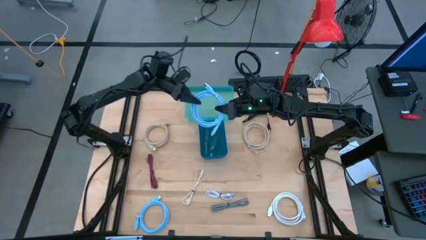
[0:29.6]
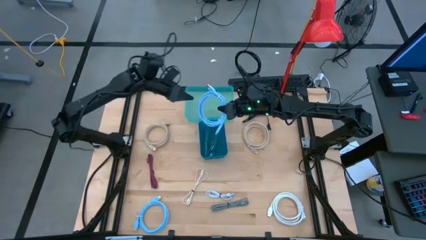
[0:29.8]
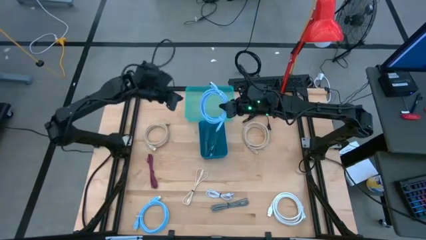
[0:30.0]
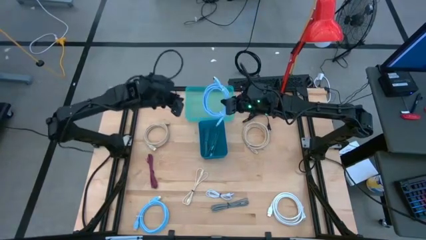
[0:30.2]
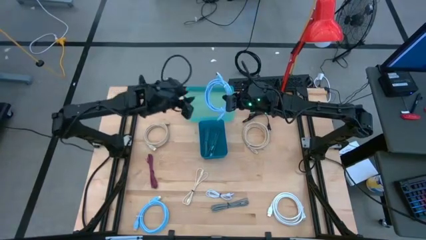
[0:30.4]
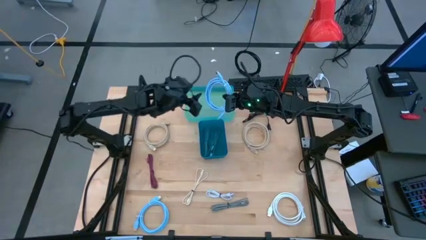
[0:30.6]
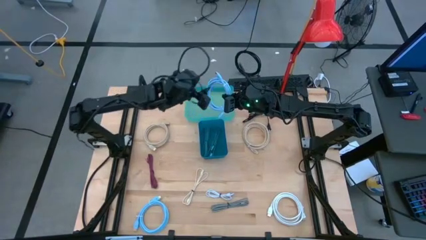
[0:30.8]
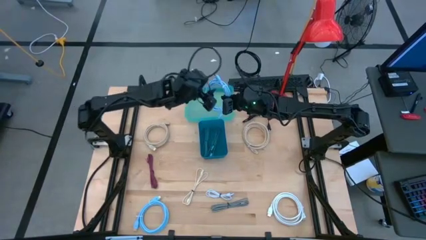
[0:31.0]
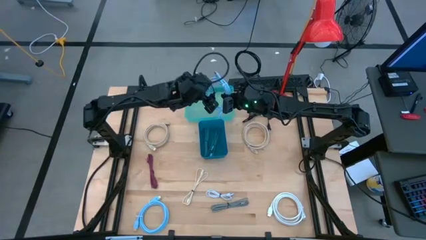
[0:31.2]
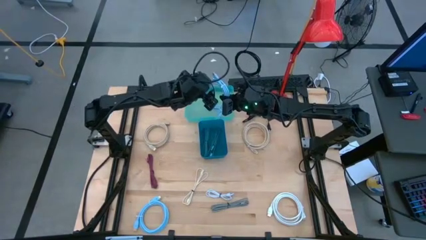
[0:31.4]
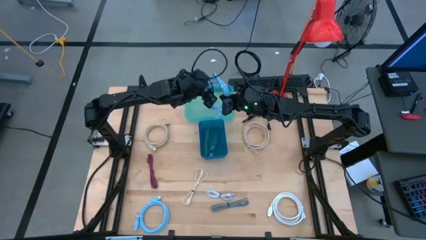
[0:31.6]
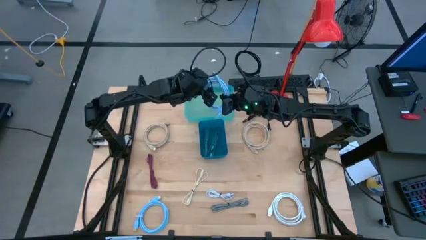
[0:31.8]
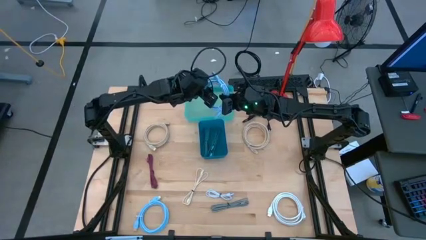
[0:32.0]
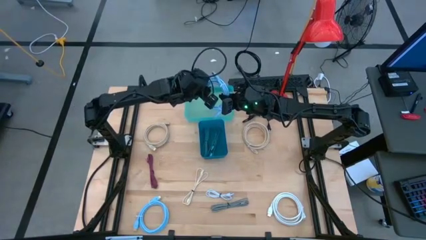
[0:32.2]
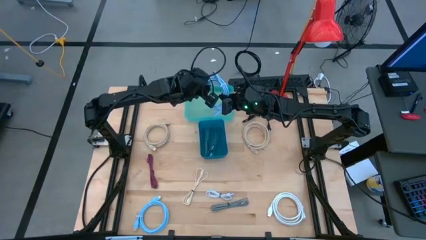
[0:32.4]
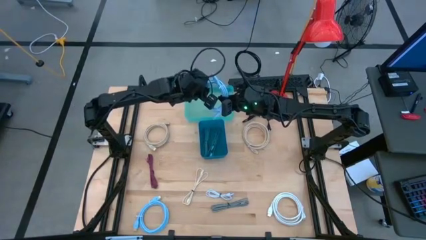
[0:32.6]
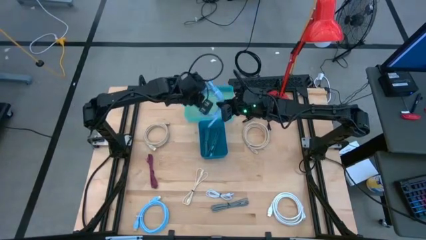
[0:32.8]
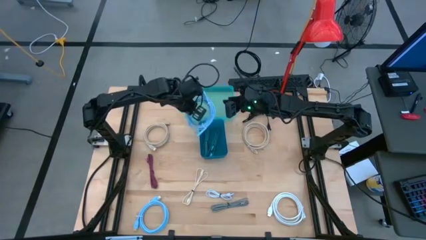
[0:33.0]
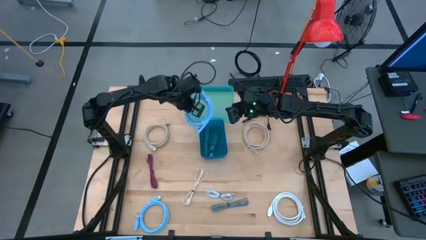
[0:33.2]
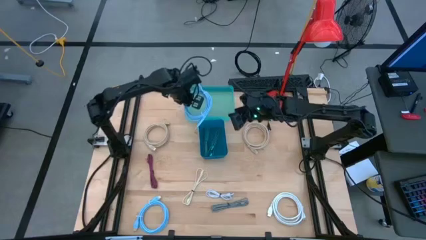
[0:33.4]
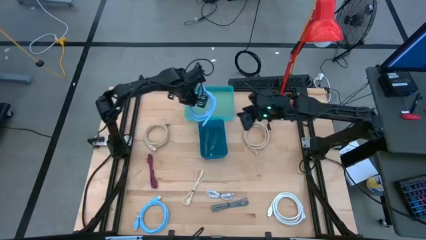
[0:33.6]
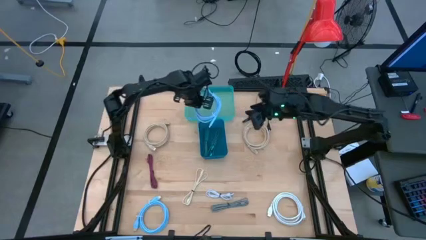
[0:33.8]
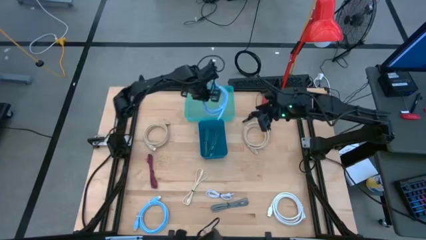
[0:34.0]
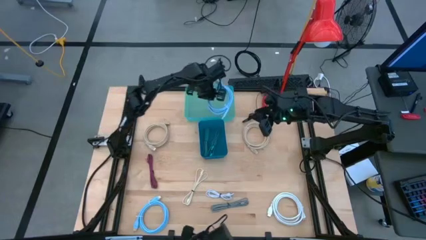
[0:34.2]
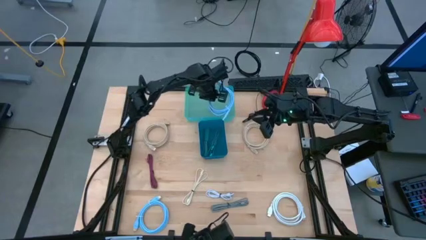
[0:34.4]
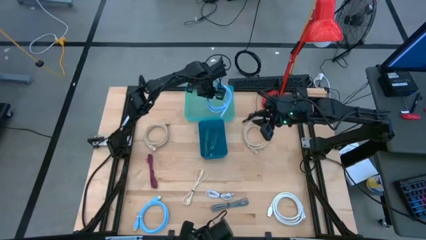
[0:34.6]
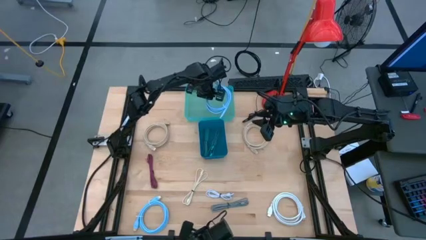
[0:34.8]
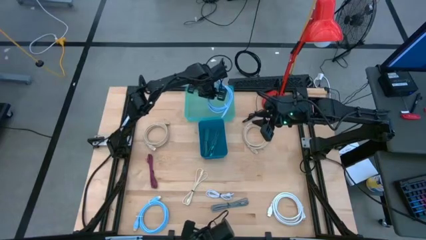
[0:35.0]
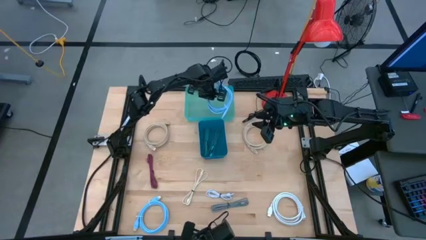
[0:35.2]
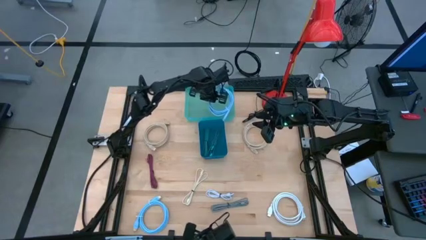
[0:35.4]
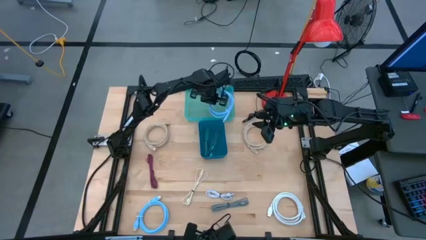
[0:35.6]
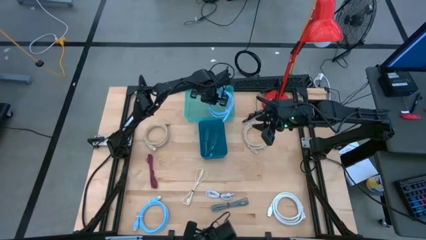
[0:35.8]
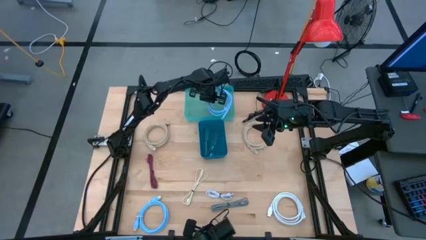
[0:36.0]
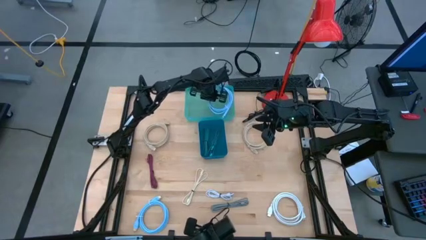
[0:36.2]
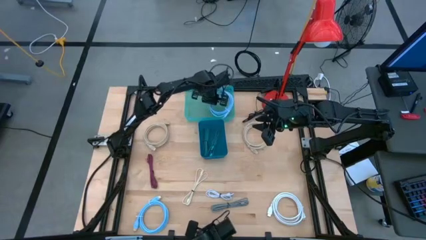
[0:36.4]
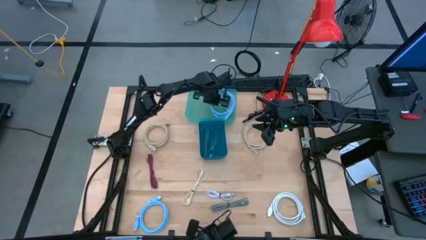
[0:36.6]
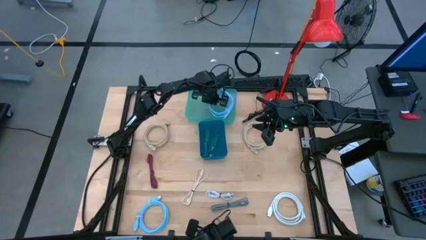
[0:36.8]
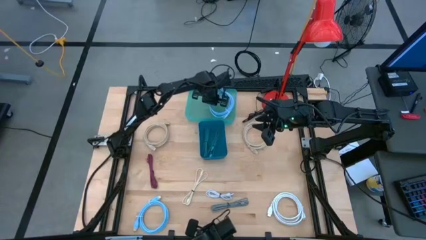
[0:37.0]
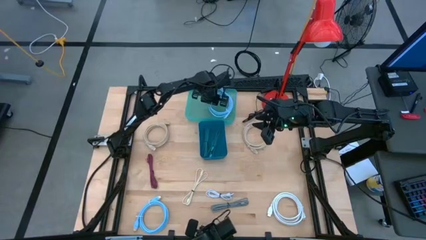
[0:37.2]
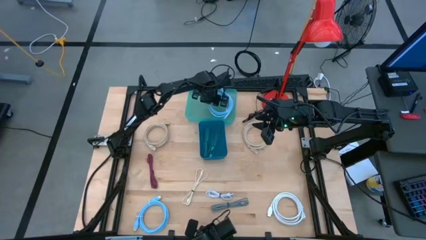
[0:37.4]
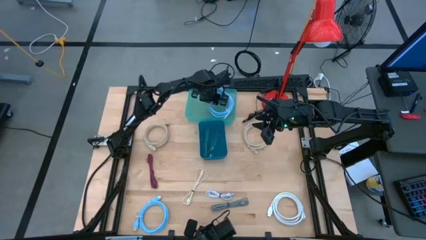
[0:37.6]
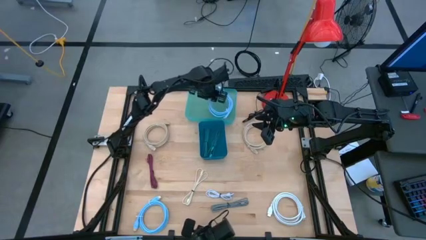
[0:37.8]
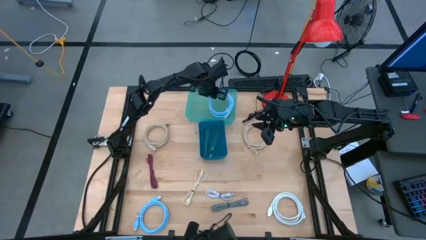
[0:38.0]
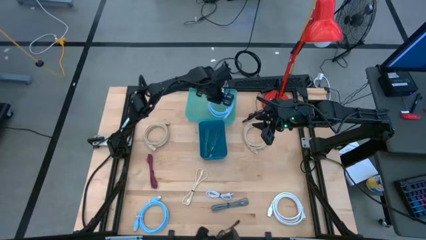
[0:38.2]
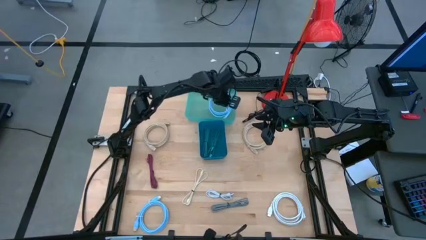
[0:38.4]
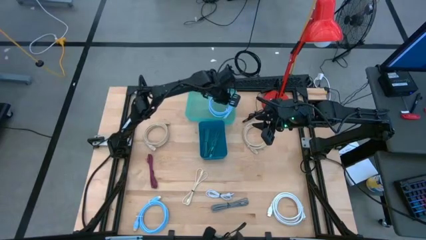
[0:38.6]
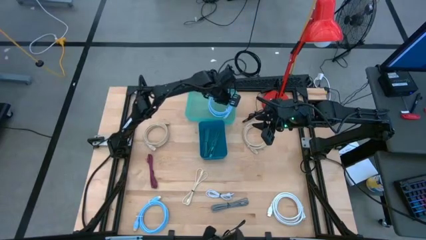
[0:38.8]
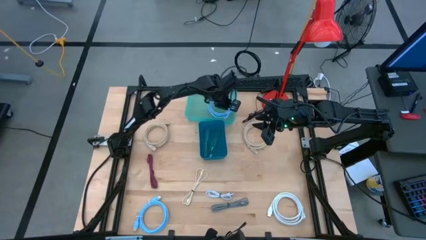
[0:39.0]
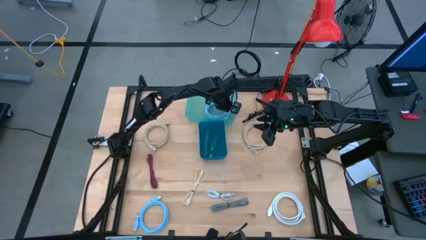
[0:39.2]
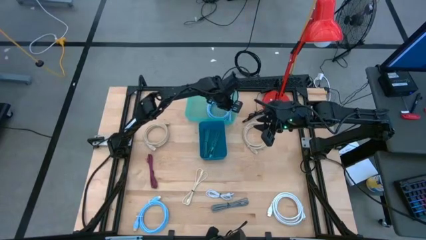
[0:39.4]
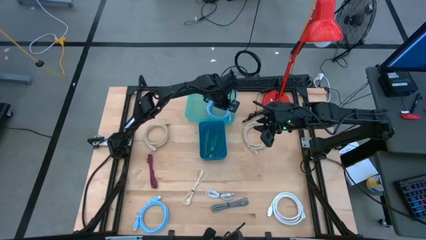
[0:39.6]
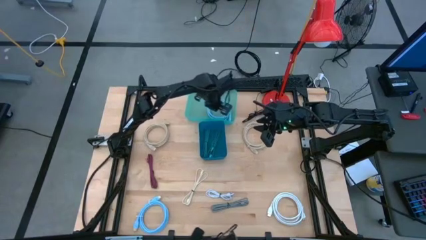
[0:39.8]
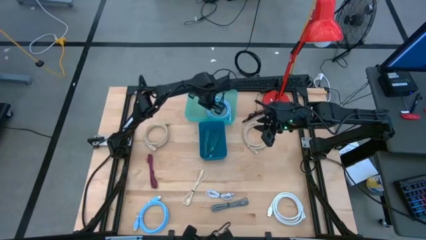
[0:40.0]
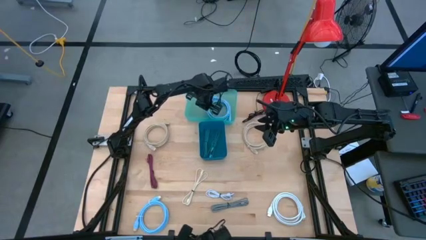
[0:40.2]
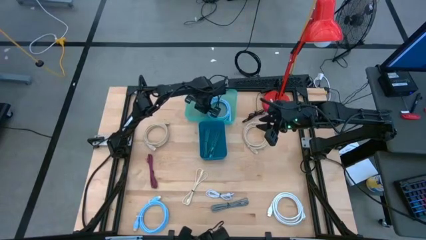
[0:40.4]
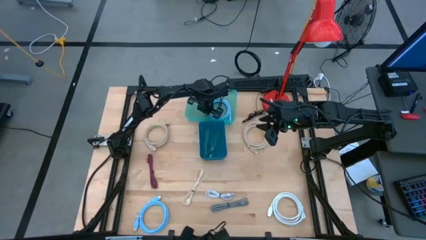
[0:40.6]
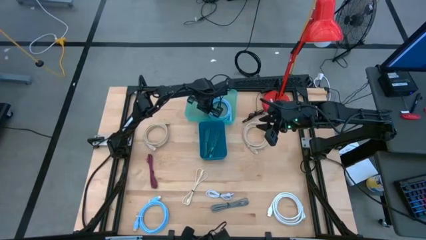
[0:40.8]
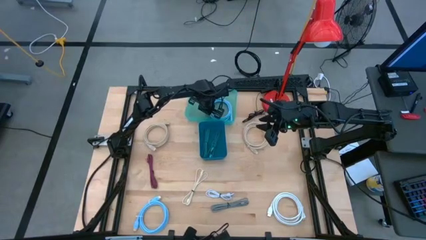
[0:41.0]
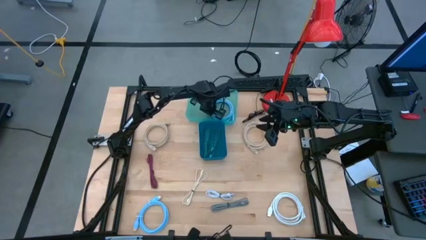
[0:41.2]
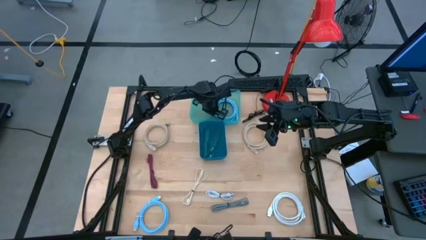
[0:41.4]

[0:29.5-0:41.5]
Task: Pick & Place USB Port
Put the top blue hdmi cable into the green bin
